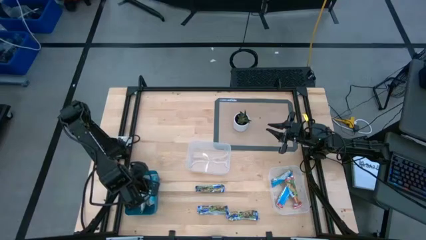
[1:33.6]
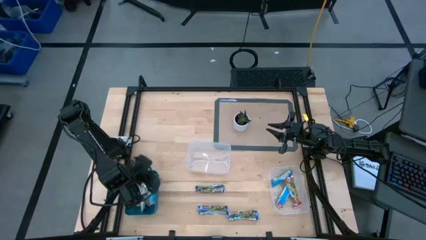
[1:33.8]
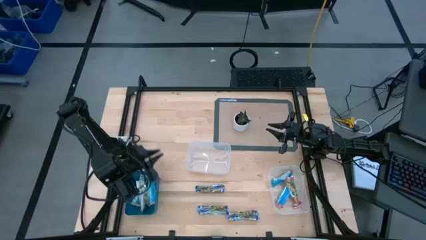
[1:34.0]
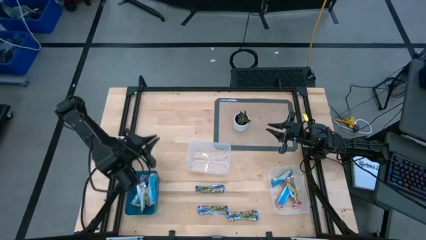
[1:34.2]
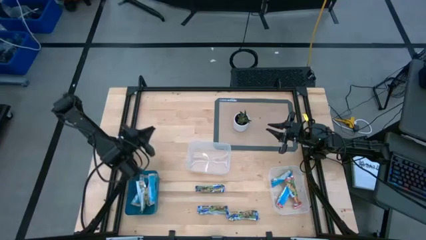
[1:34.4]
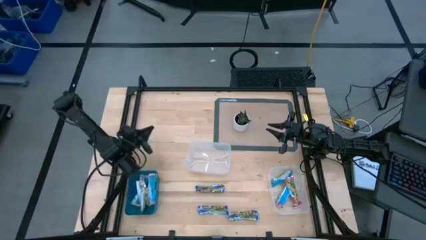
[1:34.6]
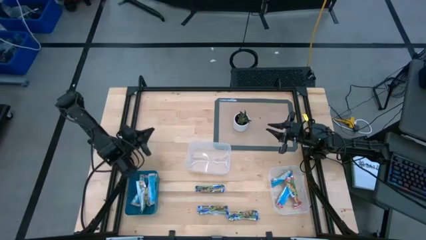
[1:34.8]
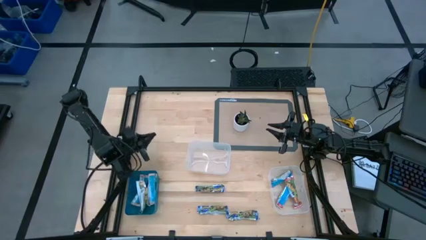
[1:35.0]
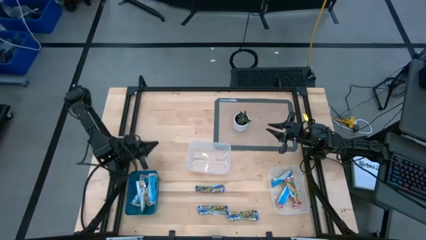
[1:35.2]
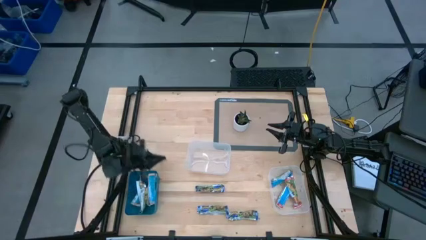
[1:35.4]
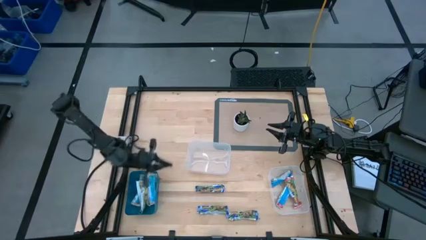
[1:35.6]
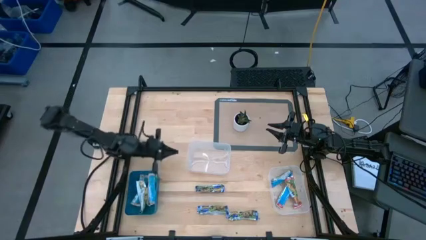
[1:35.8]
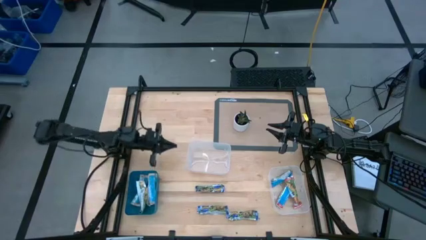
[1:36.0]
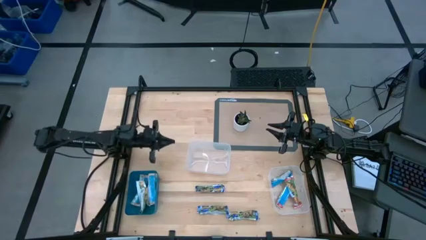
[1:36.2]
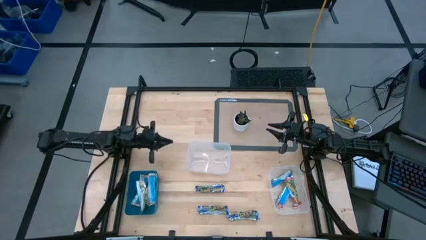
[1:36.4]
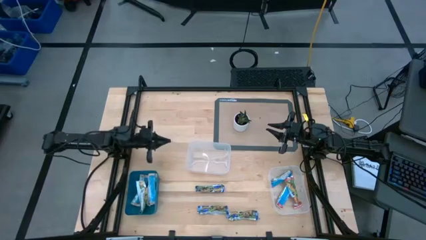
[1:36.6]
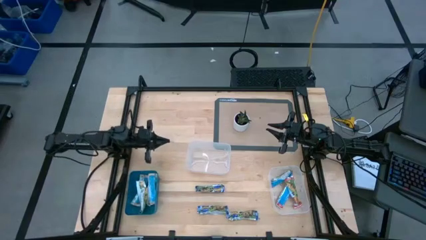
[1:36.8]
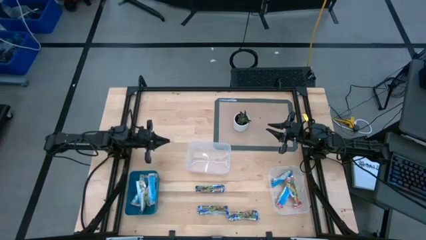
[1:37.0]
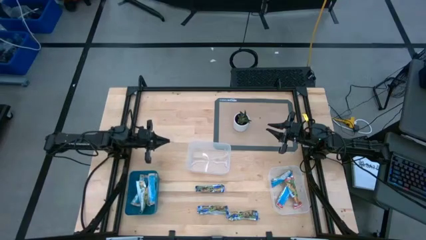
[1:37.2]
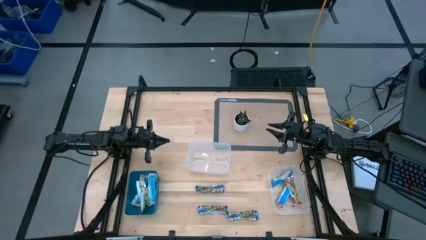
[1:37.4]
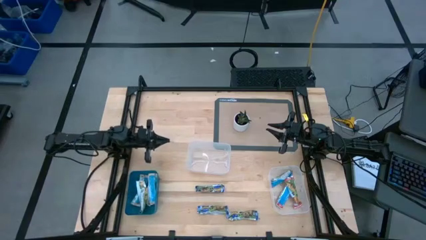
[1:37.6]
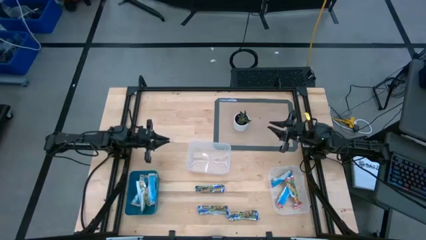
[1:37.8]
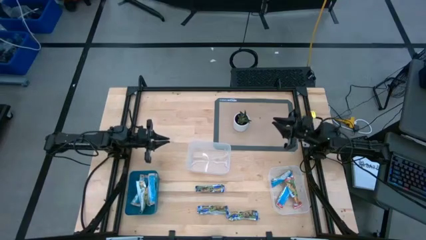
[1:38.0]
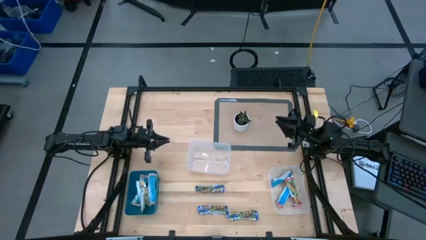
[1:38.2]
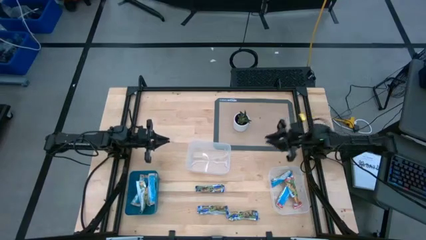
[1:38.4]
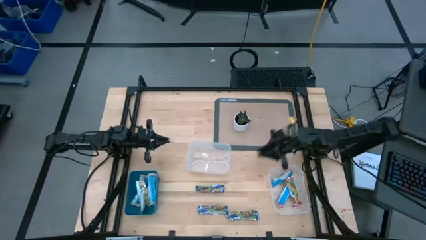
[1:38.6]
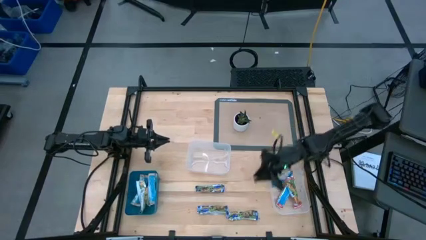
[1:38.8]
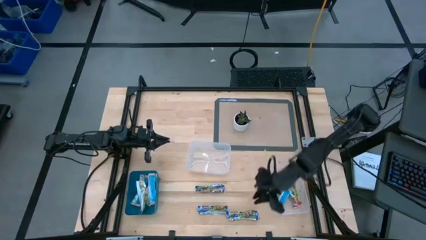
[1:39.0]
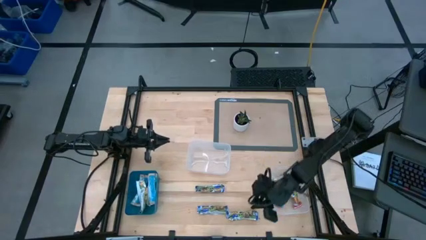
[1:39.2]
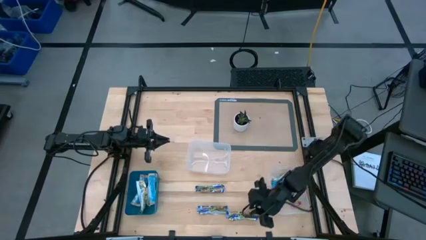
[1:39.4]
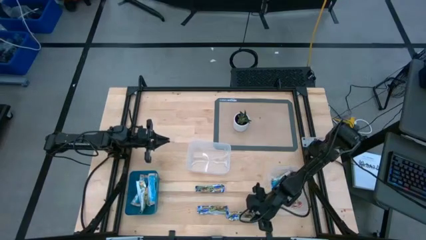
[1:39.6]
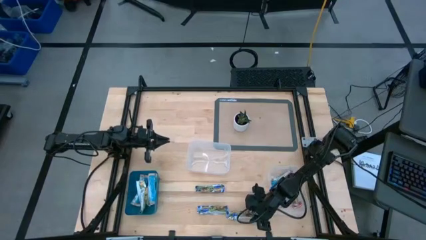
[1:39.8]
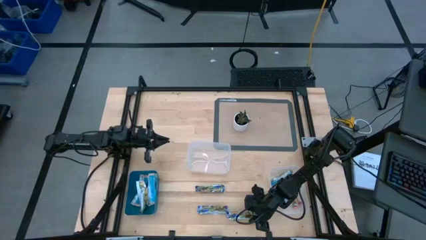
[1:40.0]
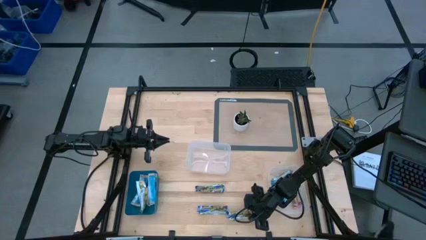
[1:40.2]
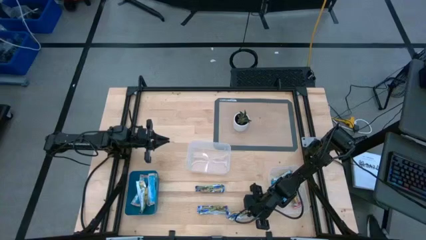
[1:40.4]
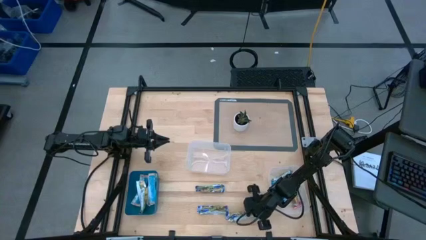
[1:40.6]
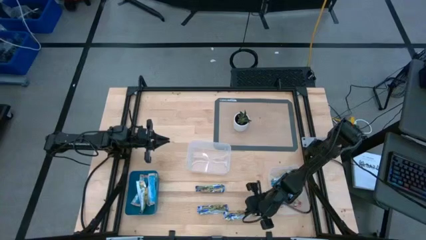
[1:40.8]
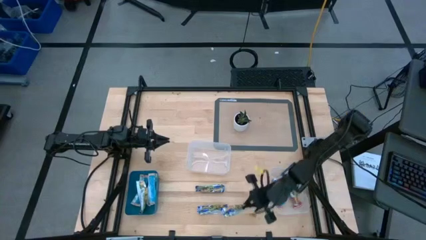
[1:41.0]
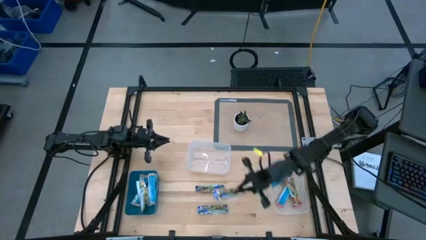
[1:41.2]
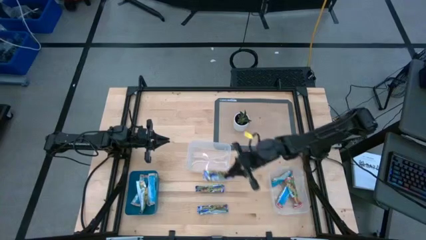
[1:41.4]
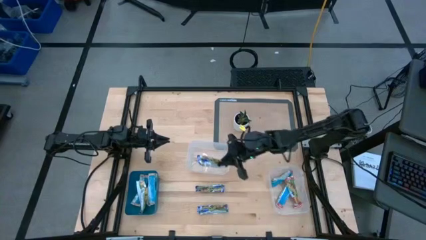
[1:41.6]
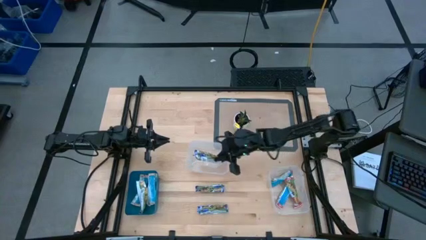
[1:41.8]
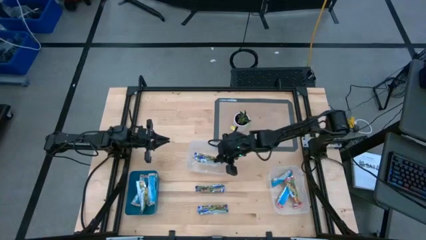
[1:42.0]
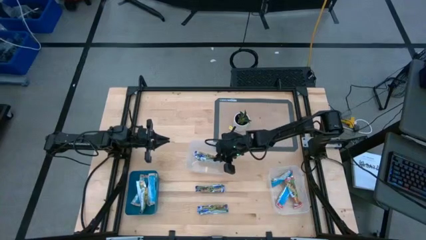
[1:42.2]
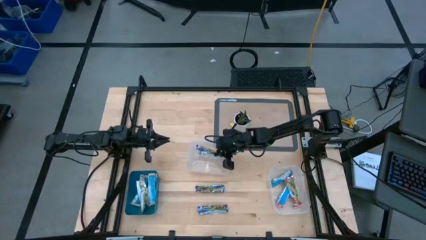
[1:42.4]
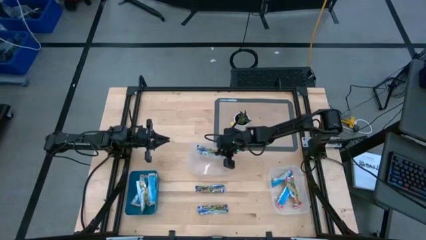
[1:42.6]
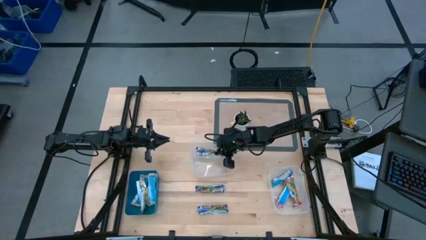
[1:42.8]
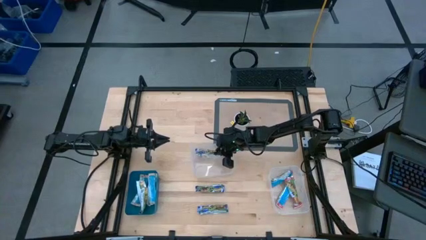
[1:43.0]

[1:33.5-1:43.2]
Task: Pick and place Granola Bars by type
Put the blue granola bar into the left transparent bin

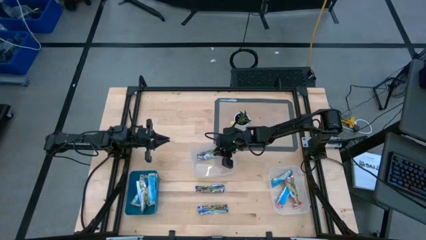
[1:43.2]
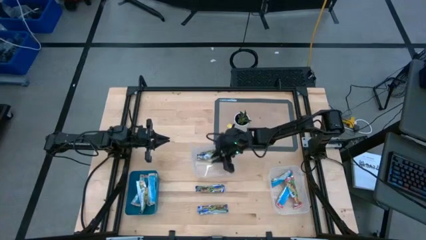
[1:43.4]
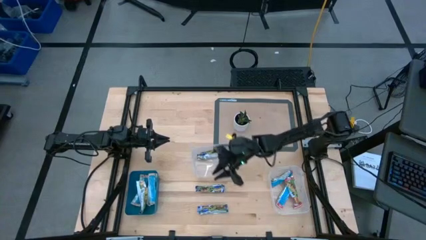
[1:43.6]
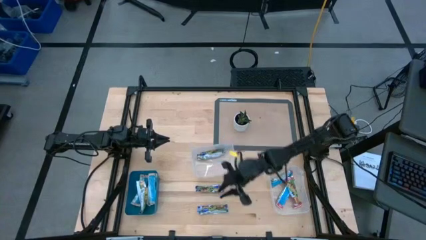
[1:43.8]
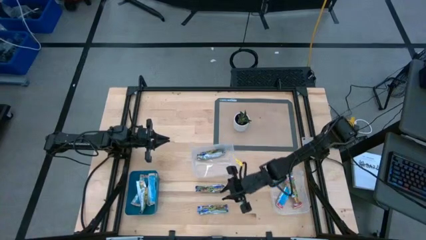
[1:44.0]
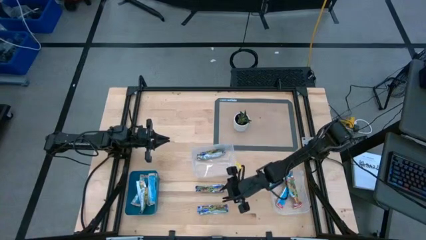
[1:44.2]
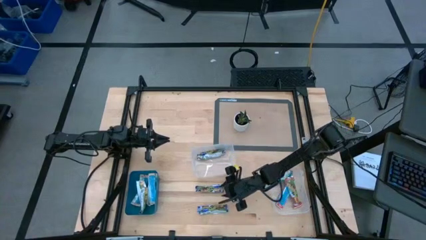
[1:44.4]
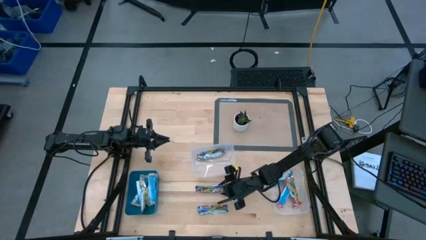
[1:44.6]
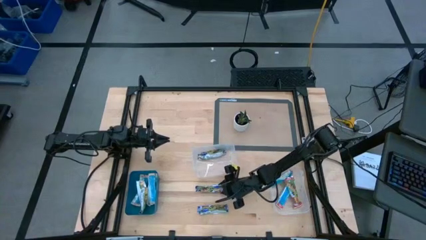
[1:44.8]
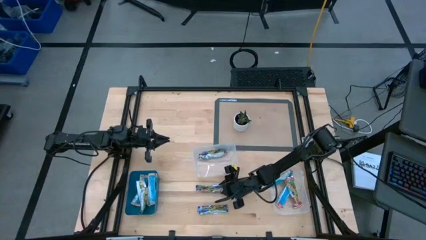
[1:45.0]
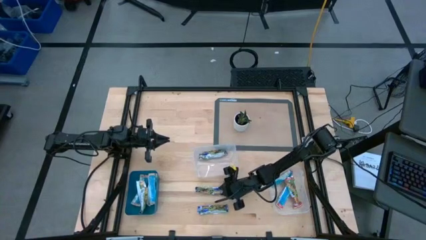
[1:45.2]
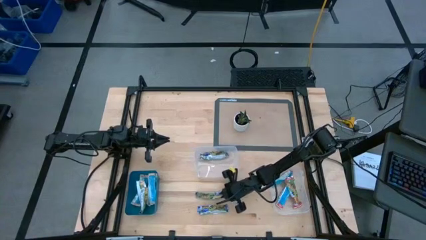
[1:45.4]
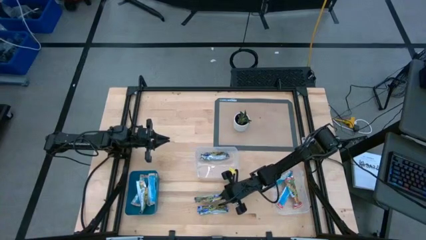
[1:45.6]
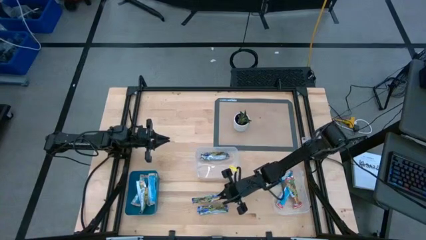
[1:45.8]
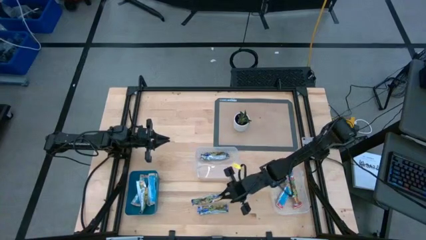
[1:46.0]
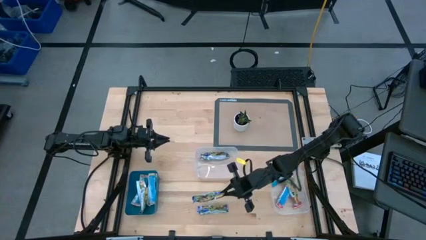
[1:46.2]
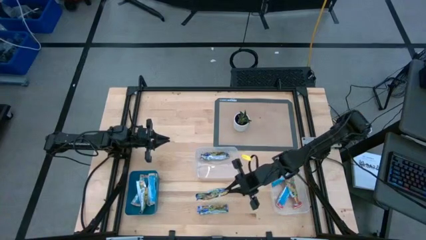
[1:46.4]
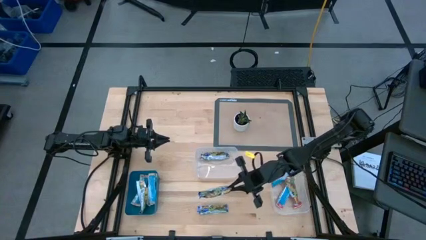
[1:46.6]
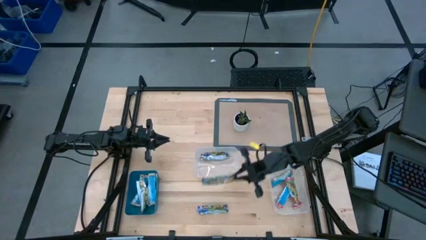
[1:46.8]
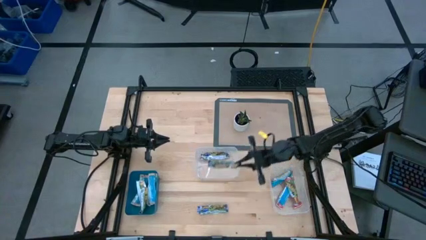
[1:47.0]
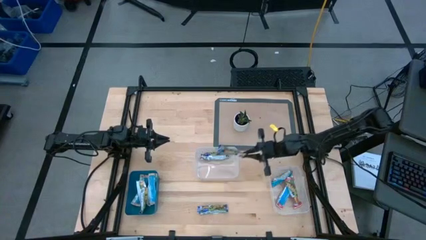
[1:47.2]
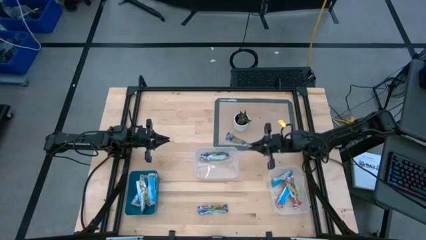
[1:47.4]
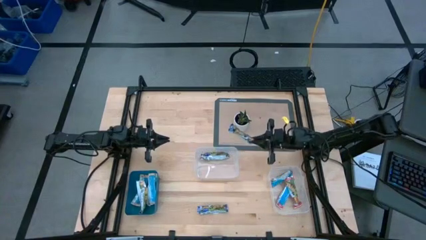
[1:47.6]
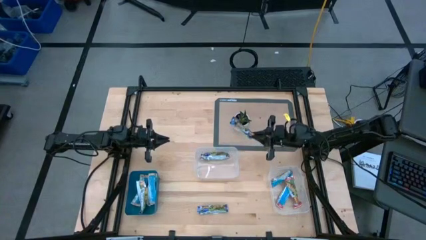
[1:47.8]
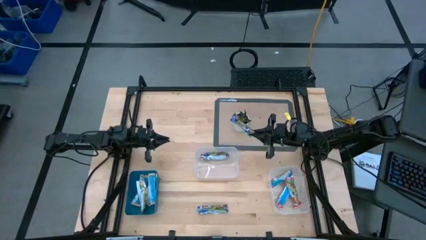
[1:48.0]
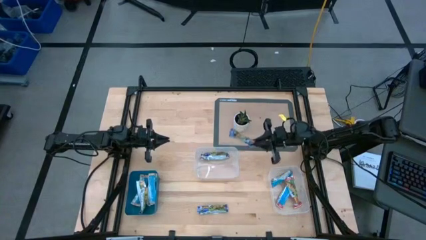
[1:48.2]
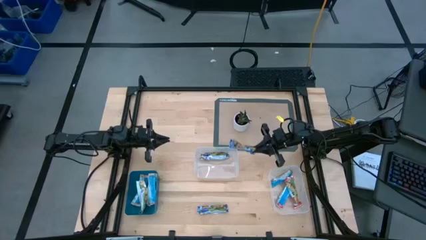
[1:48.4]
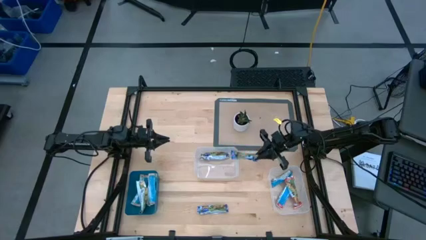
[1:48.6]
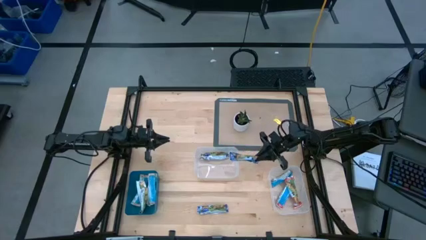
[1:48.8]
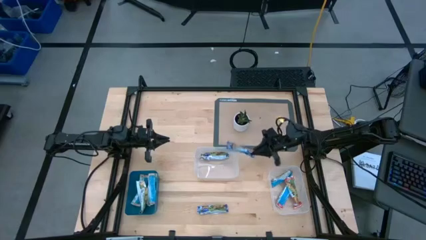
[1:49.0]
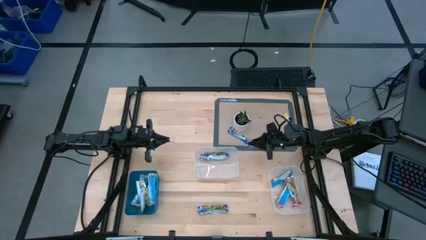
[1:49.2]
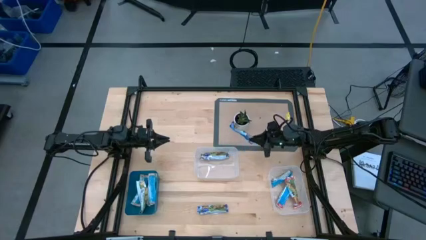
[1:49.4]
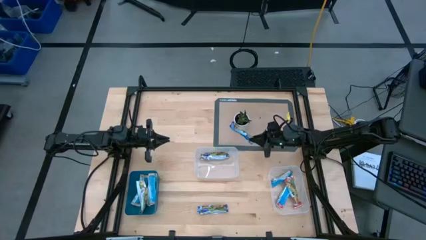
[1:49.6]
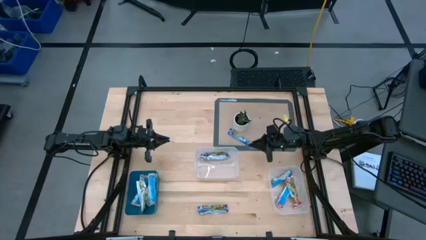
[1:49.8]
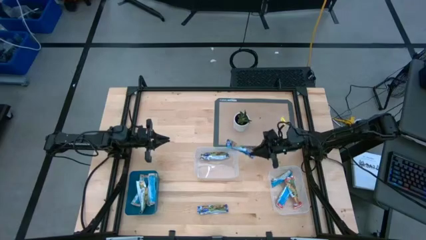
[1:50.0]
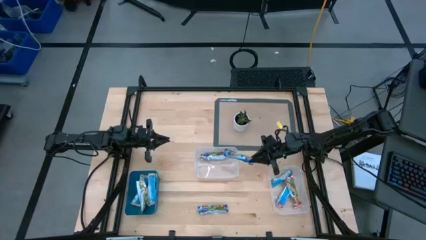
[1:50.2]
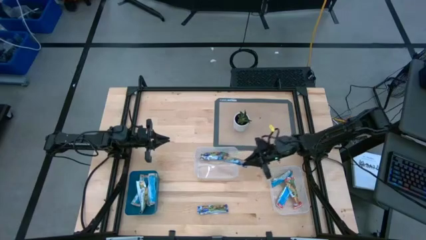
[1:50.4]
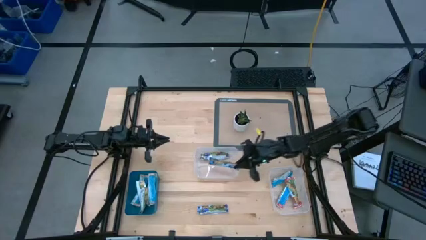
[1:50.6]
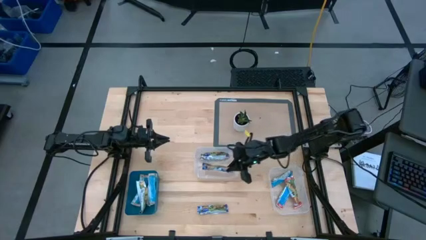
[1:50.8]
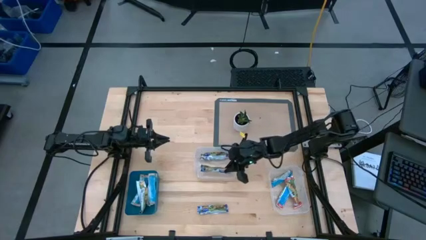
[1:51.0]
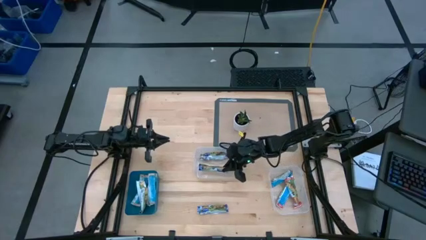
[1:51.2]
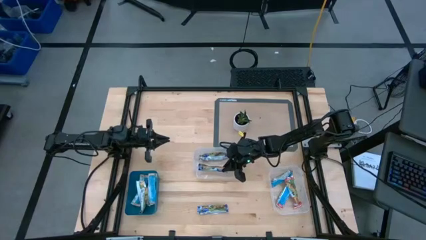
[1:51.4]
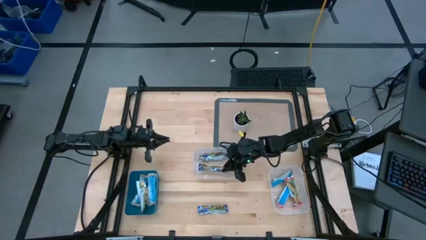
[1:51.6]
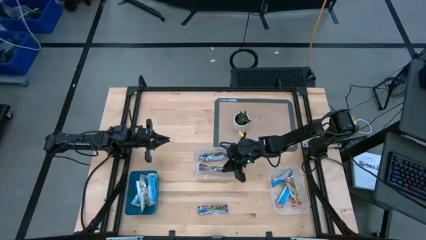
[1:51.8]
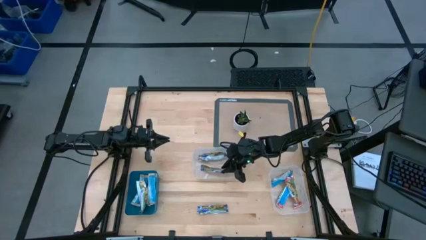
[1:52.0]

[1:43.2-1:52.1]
Put the blue granola bar into the left transparent bin
